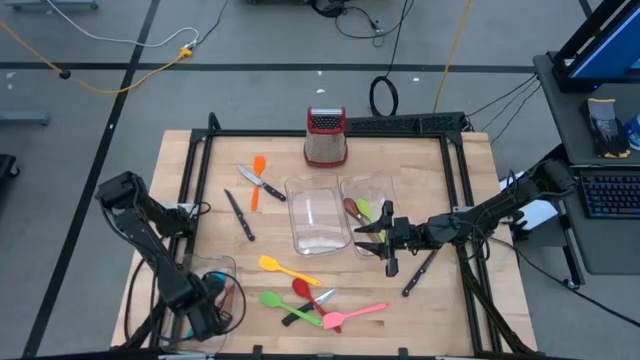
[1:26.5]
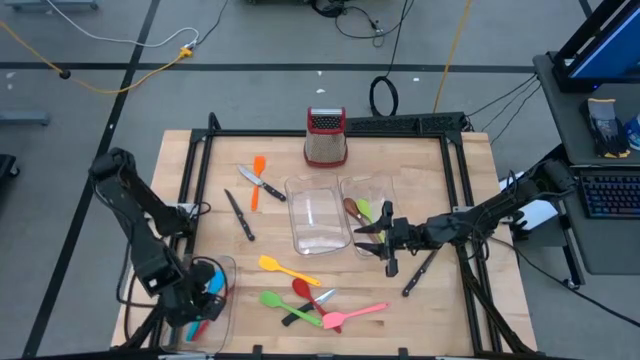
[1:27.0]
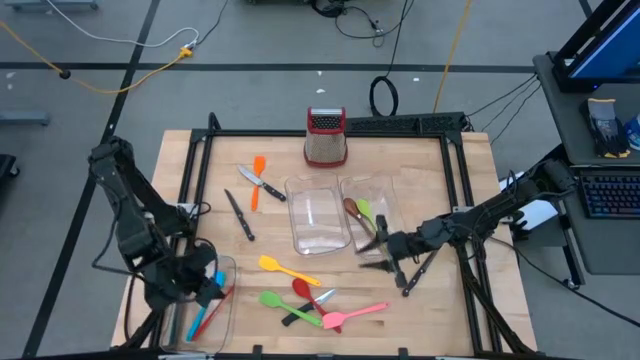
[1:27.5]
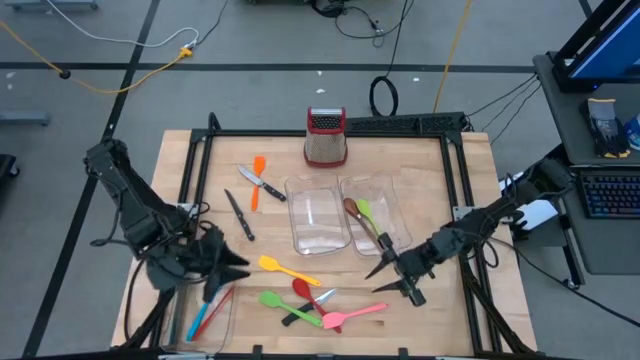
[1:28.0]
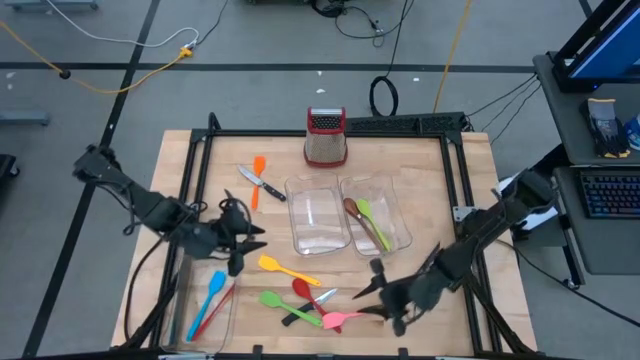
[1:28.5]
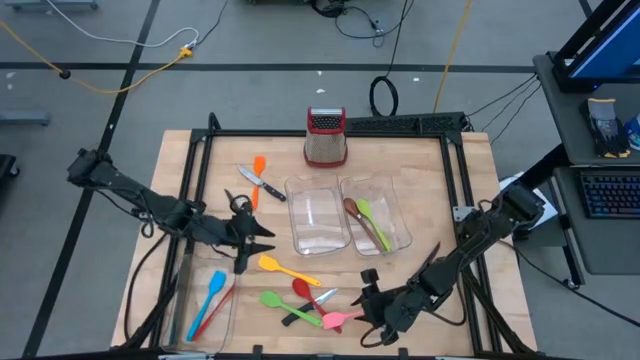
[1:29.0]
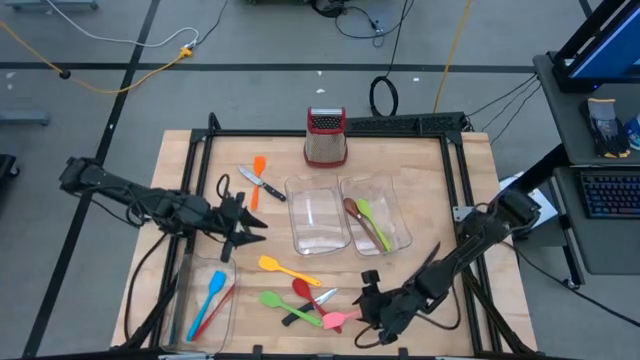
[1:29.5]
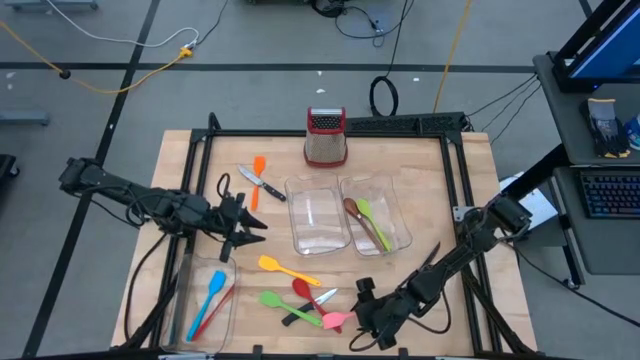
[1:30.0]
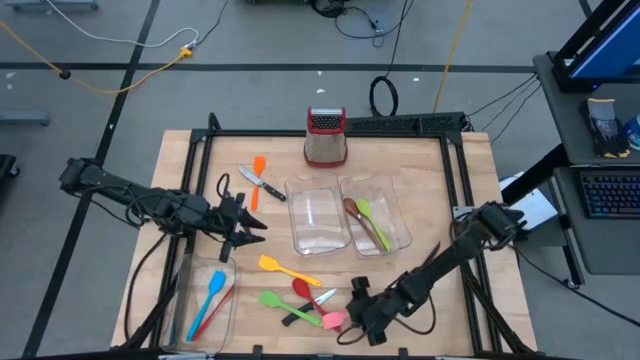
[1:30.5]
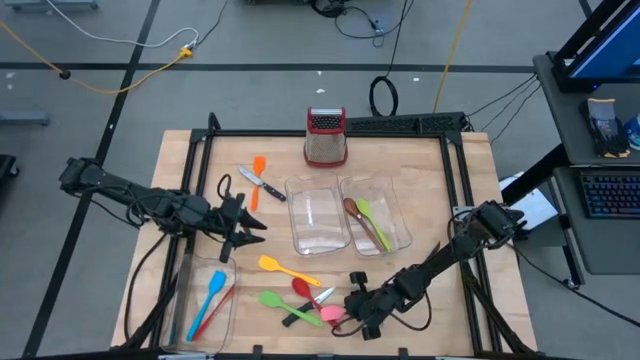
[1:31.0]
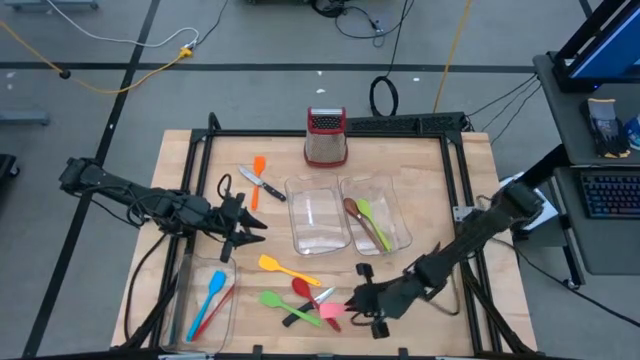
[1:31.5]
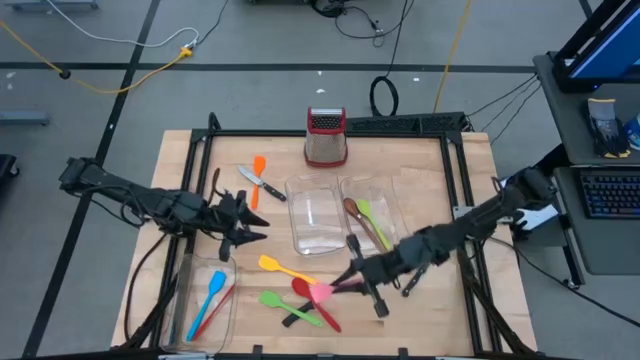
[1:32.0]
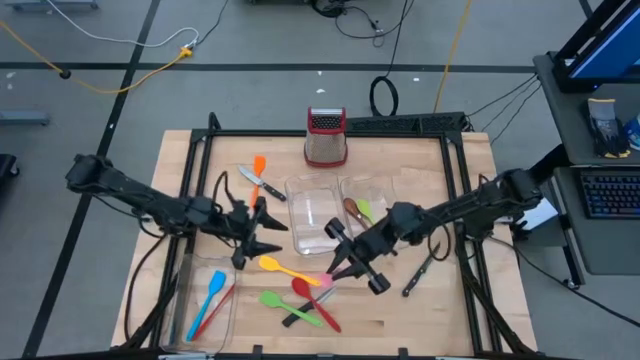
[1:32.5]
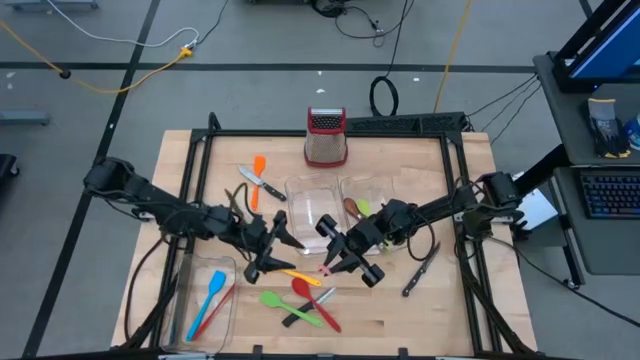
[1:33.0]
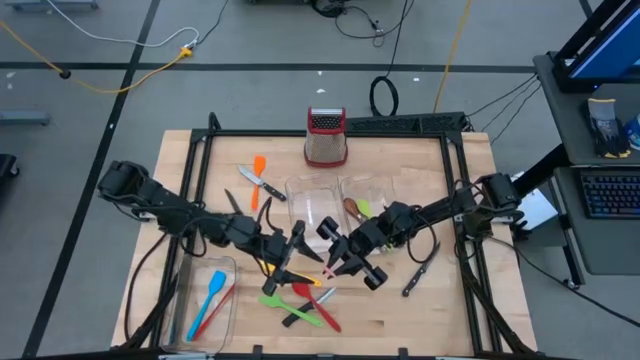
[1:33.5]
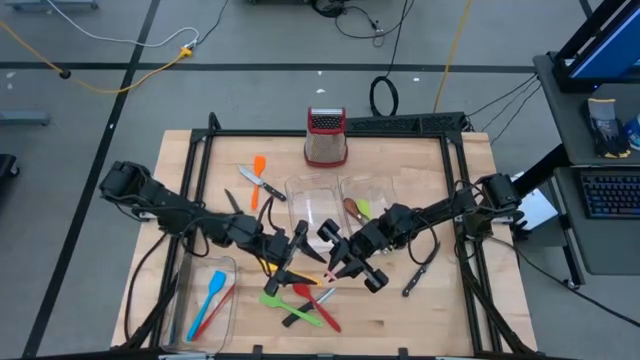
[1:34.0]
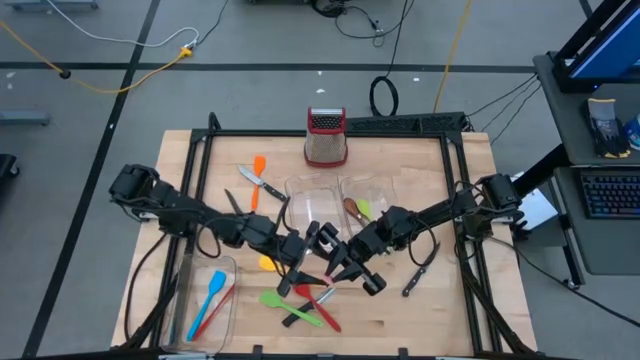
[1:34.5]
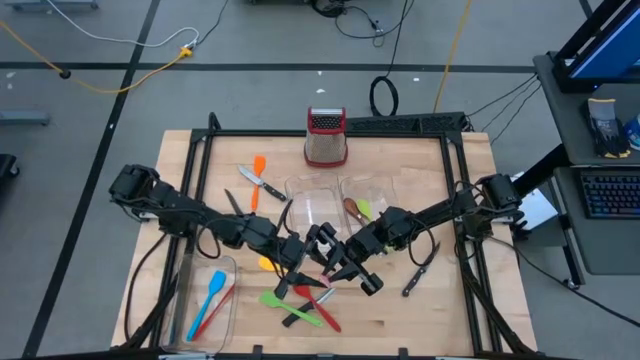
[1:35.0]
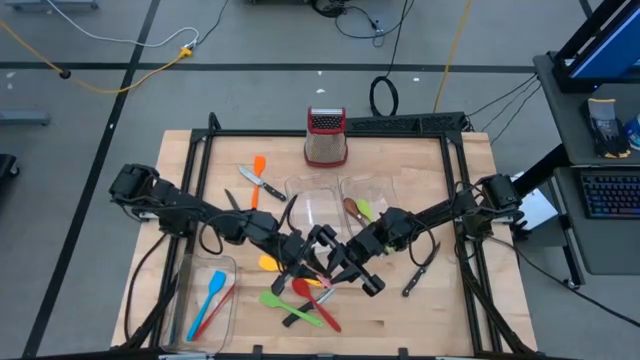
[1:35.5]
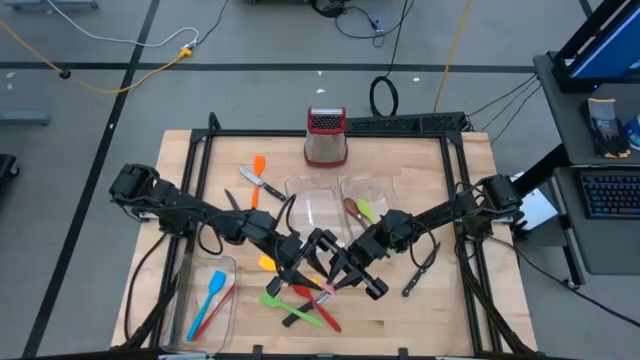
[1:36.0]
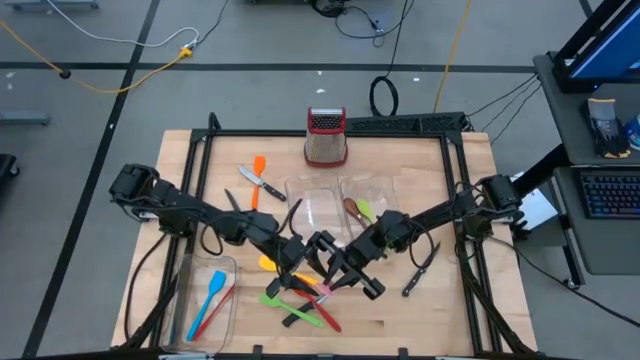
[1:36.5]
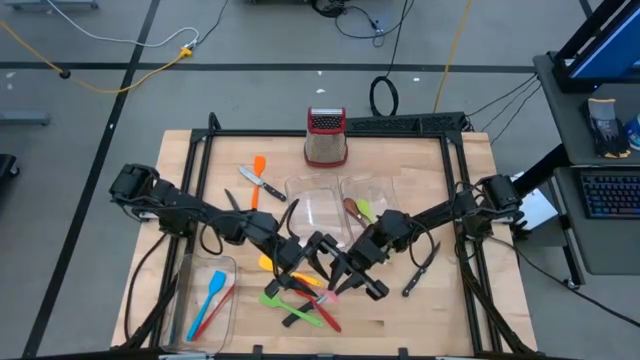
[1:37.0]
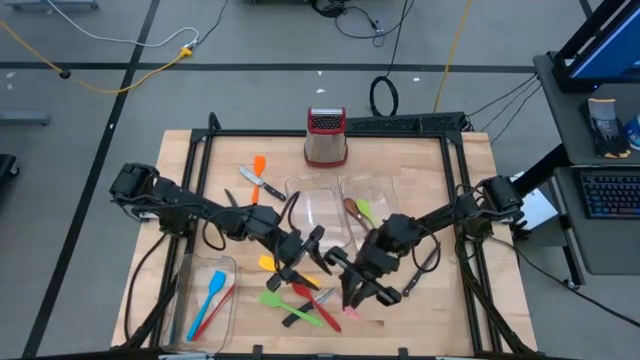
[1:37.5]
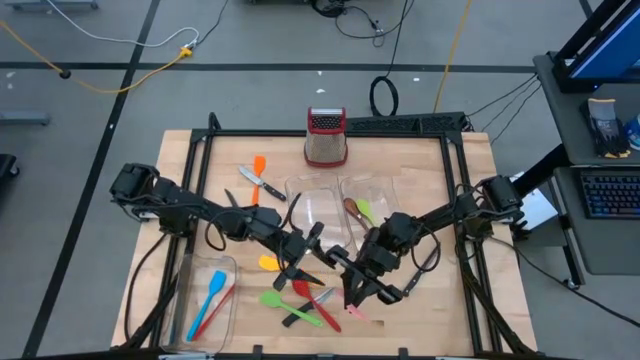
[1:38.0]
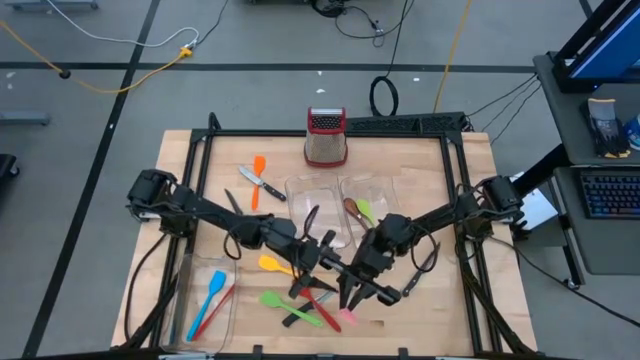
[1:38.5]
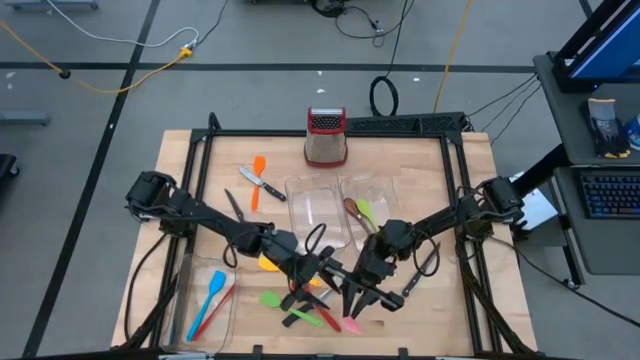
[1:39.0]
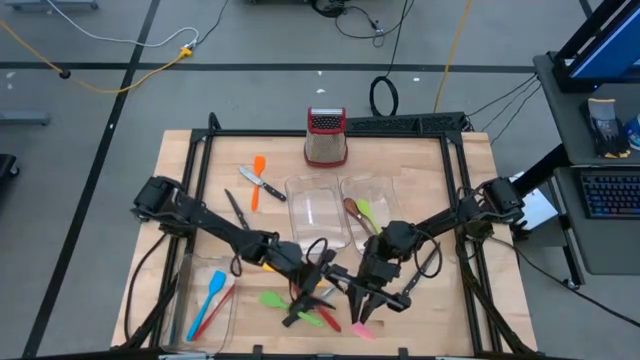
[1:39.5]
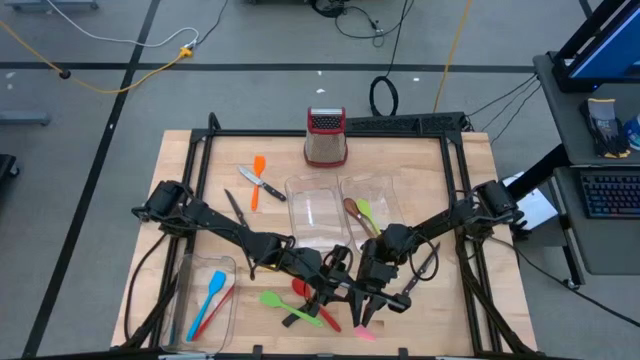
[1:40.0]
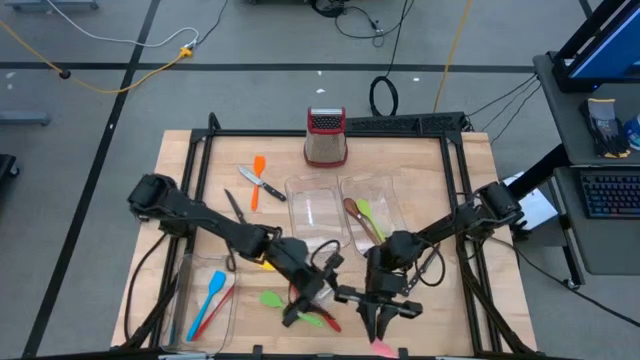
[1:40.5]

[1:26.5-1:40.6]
Task: Pick & Place Kitchen Items
Put the pink spatula into the left transparent bin

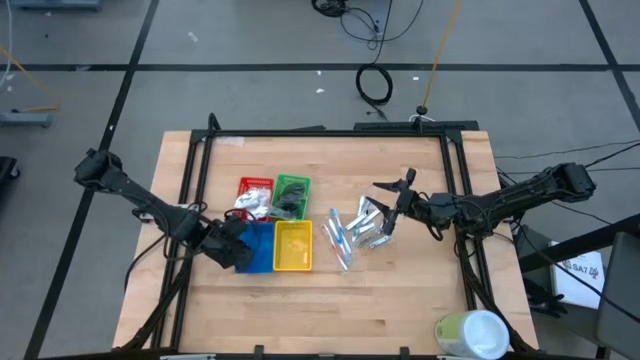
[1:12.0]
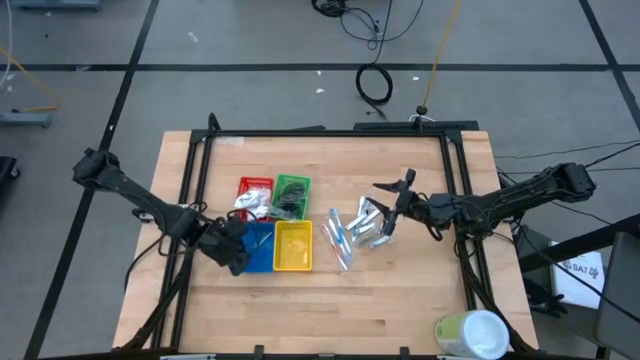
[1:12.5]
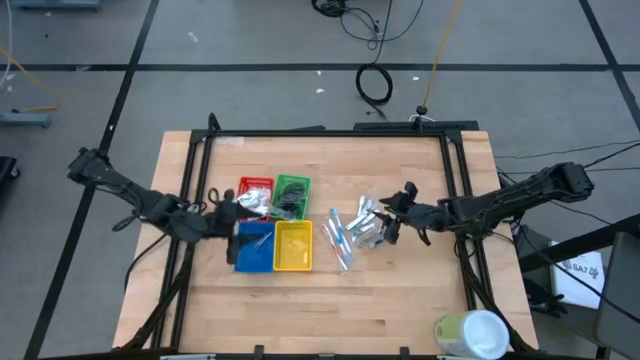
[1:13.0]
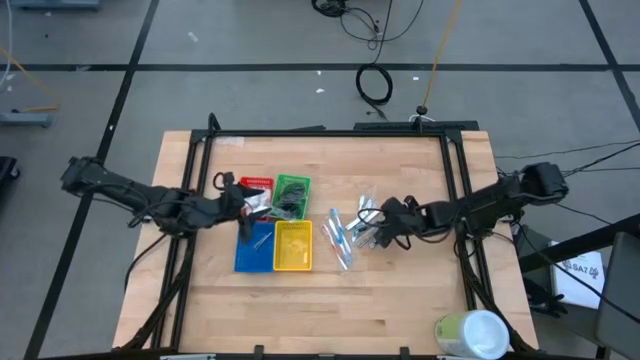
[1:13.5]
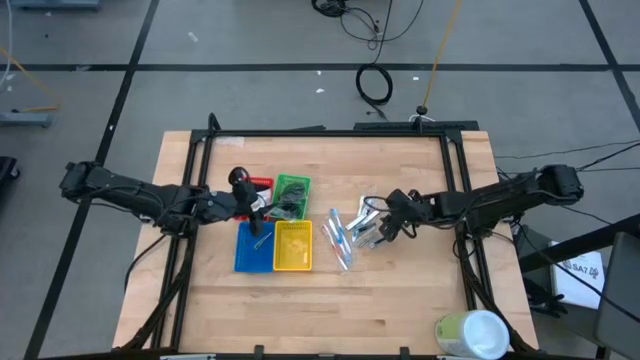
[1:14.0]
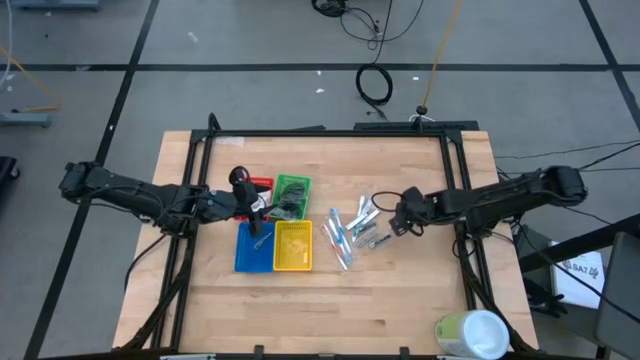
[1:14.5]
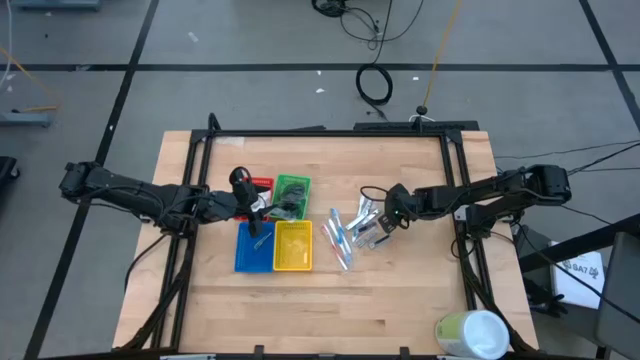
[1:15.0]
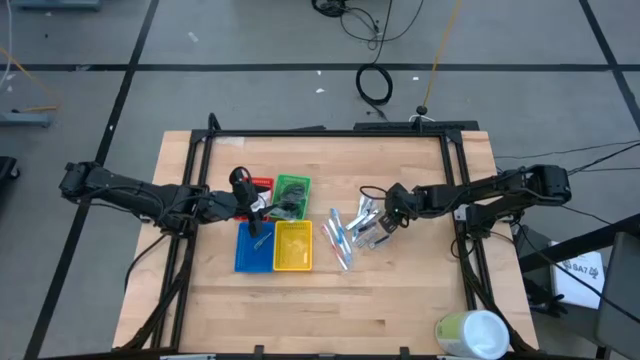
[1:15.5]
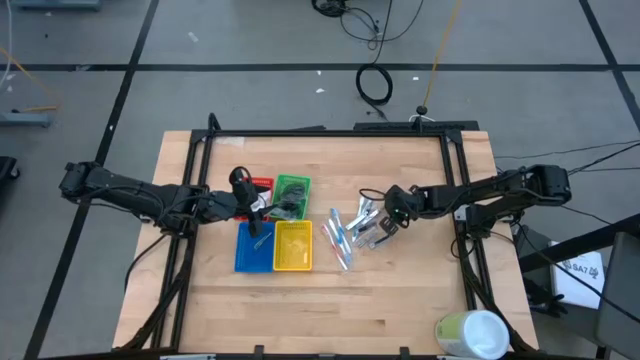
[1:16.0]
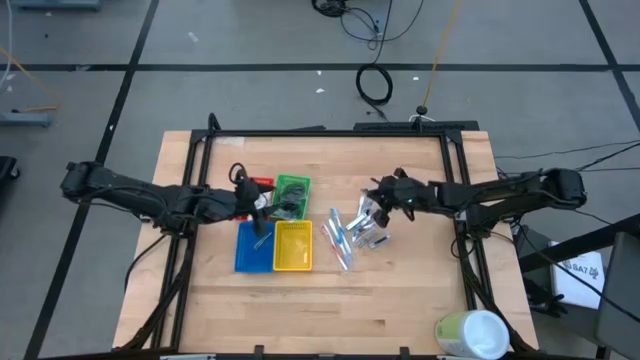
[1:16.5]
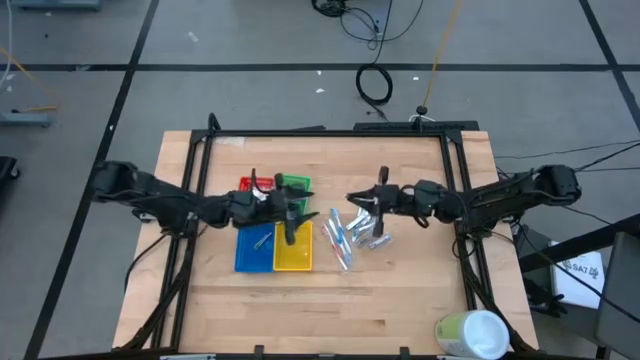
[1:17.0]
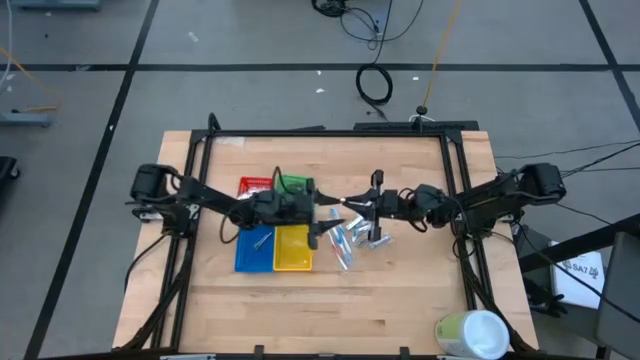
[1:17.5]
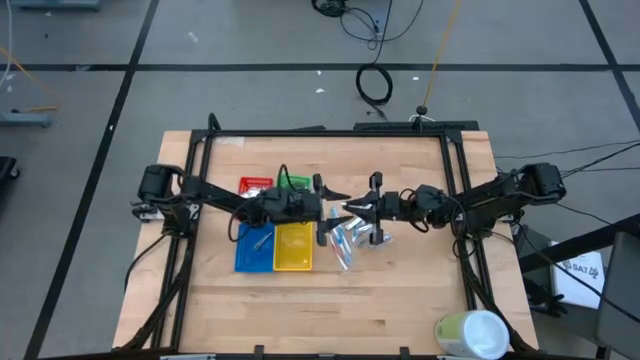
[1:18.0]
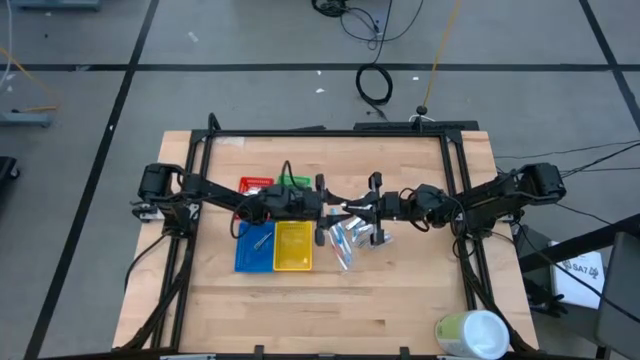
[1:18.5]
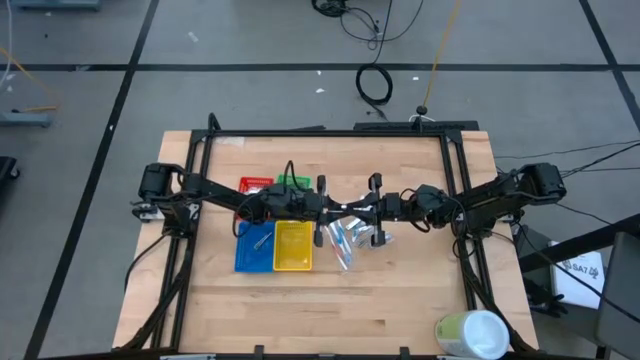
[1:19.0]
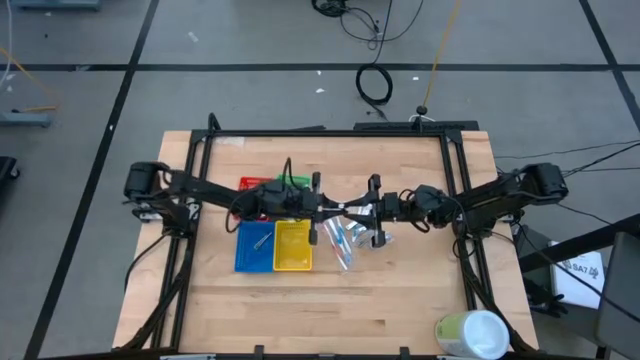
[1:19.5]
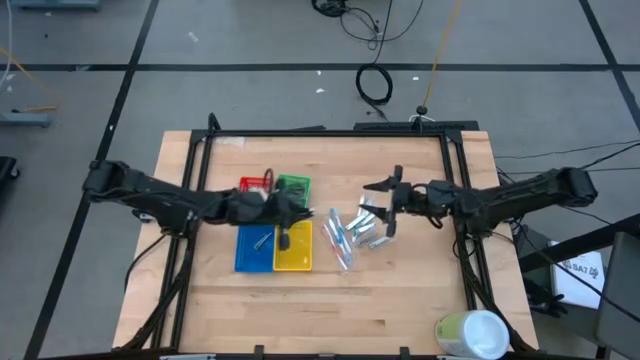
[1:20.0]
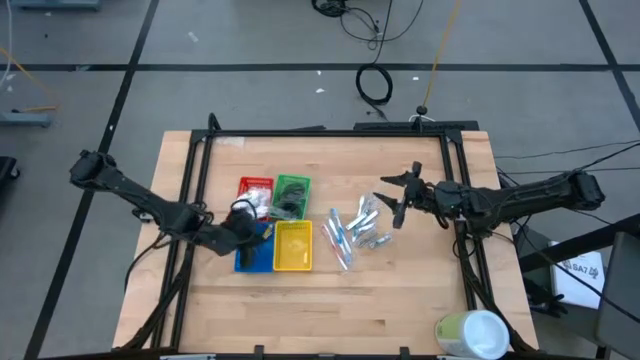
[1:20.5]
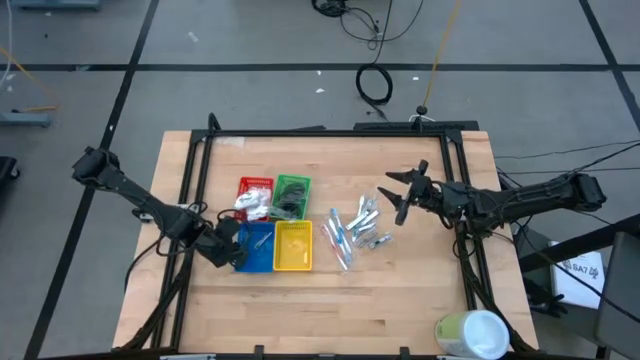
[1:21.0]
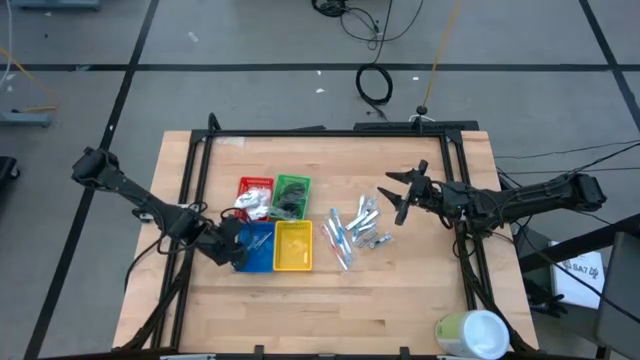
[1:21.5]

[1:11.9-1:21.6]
Task: Pick & Place Travel size toiletries
Put the silver nail cutter into the blue bin
